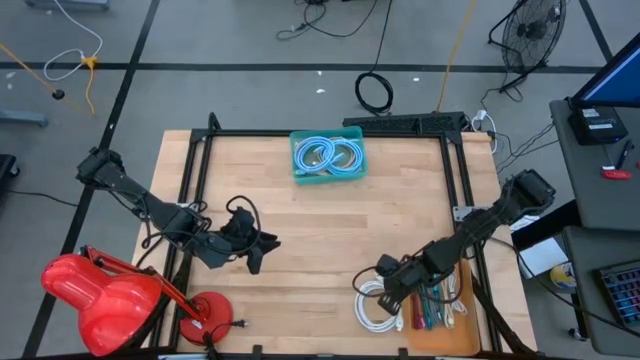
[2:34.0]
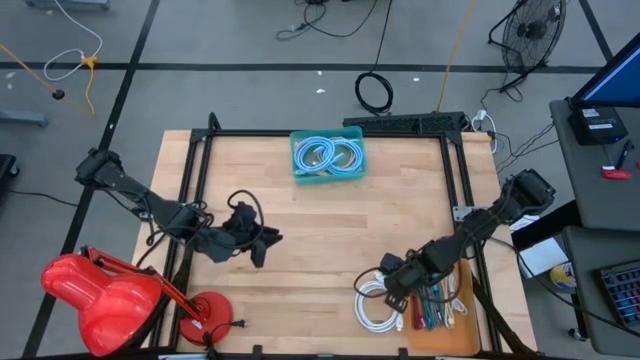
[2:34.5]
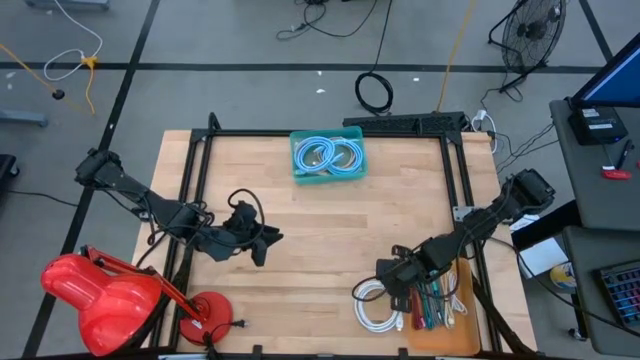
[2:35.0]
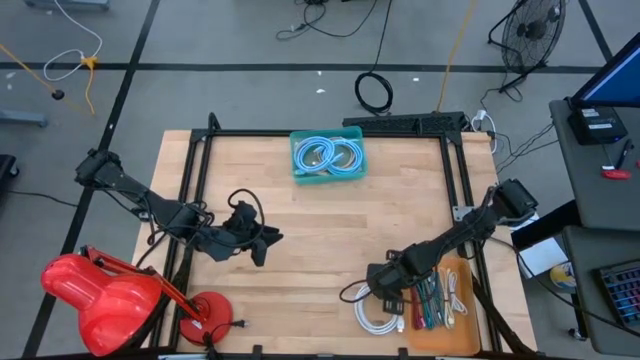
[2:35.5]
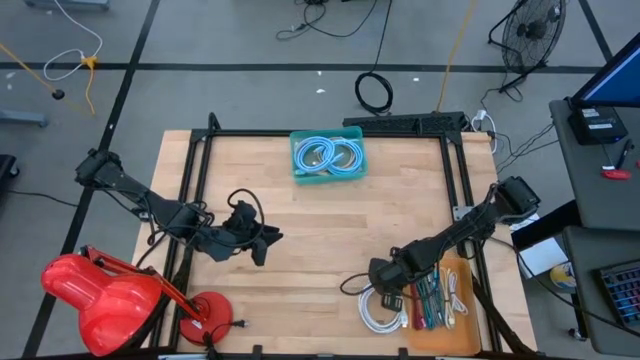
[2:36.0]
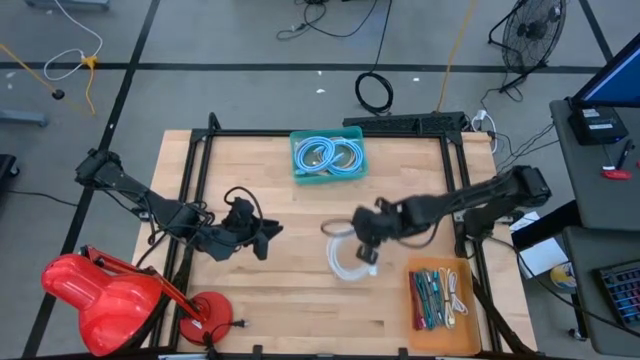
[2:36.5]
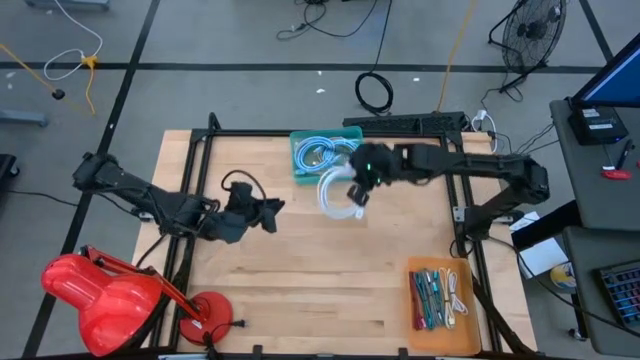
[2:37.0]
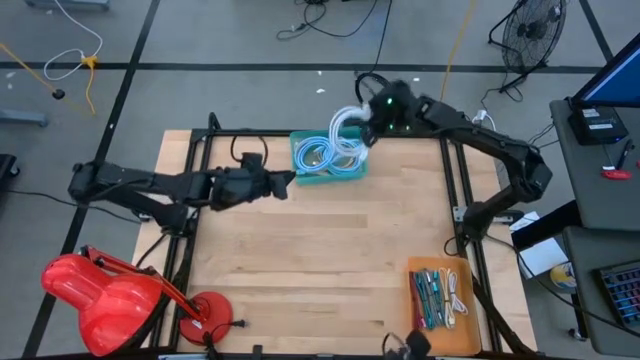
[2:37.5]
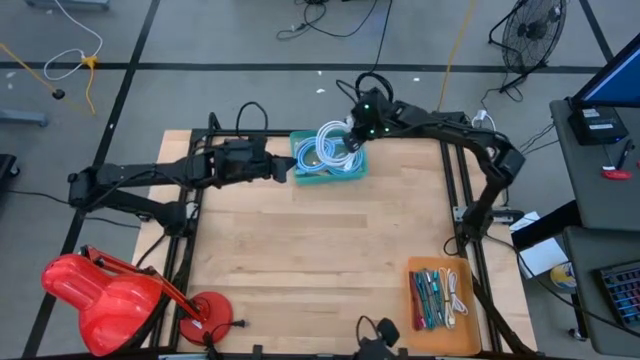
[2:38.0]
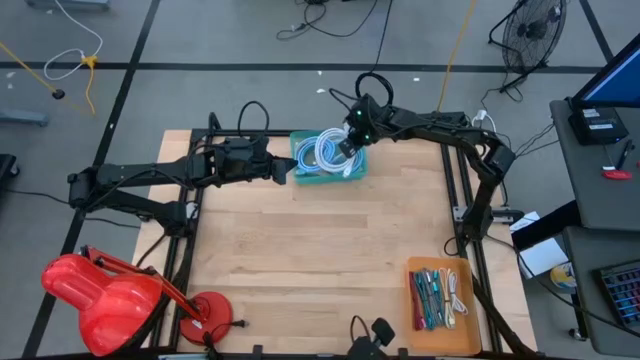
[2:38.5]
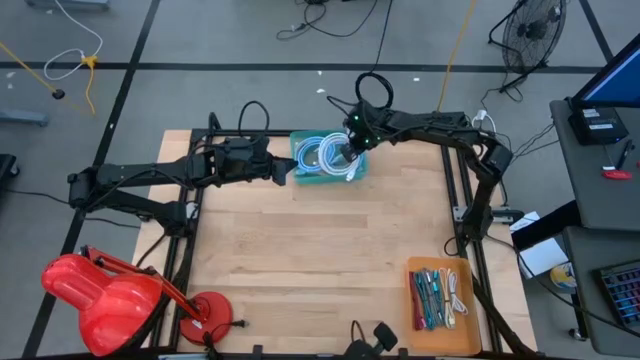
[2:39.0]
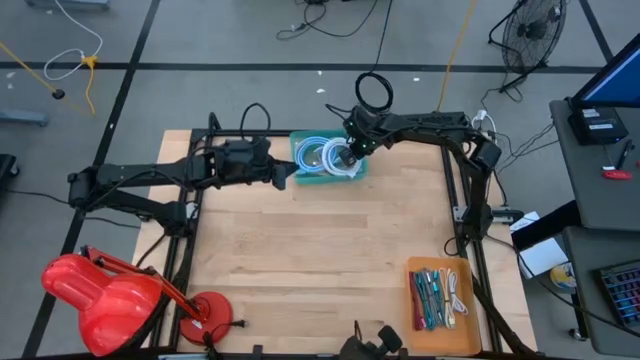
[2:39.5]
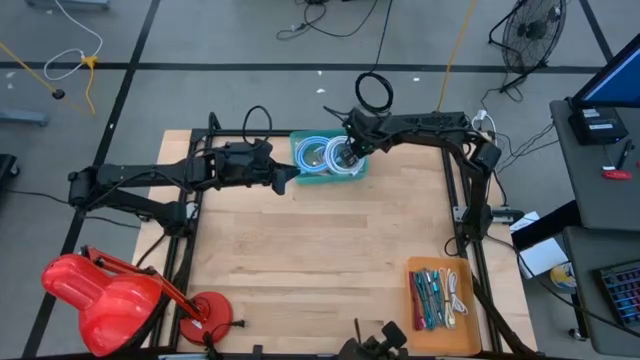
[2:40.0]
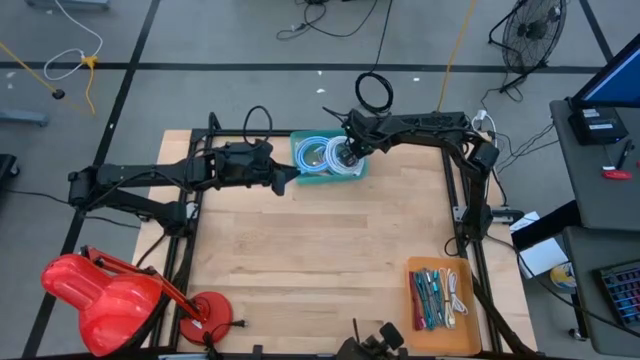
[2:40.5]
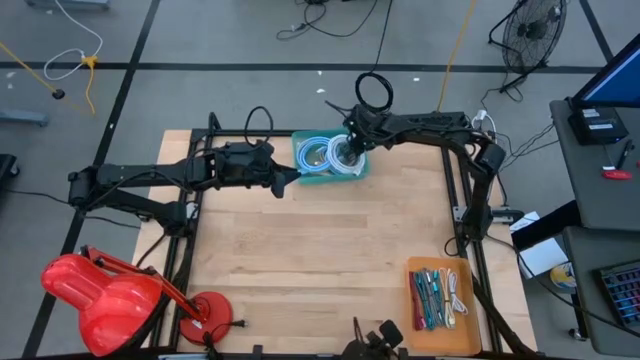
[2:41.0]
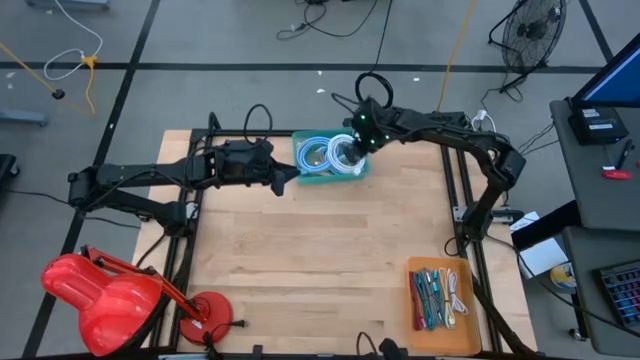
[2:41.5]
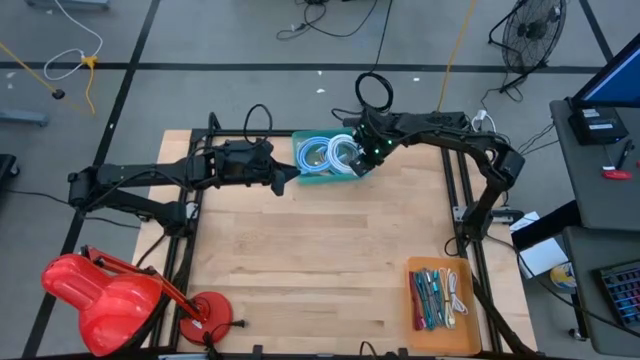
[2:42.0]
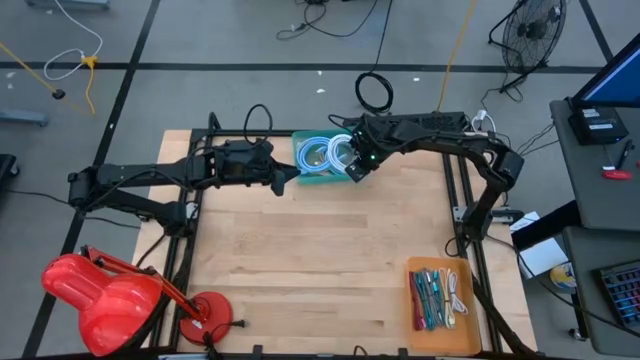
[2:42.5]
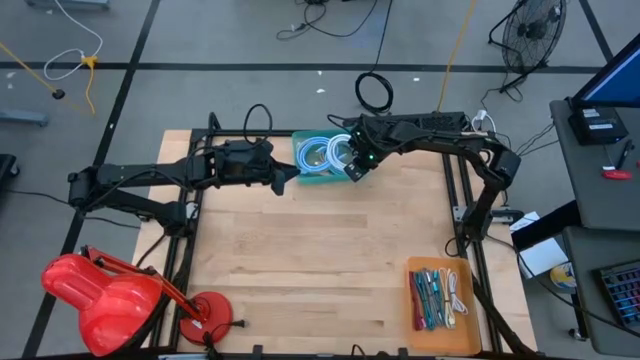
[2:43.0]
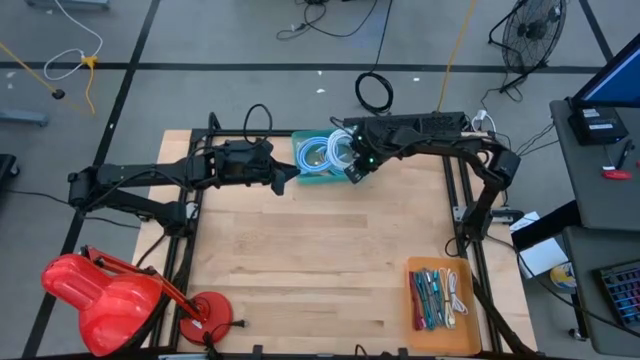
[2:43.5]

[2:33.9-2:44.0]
Task: Pick & Place USB Port
Put the white display cable into the blue bin

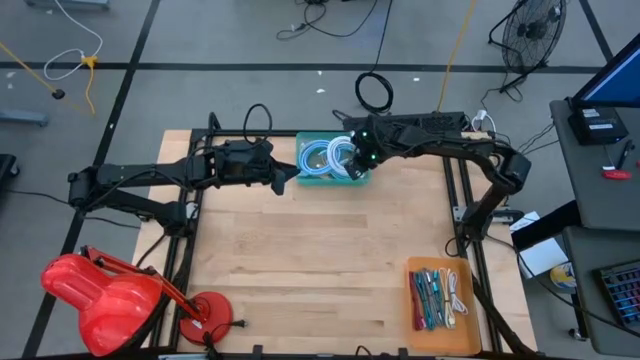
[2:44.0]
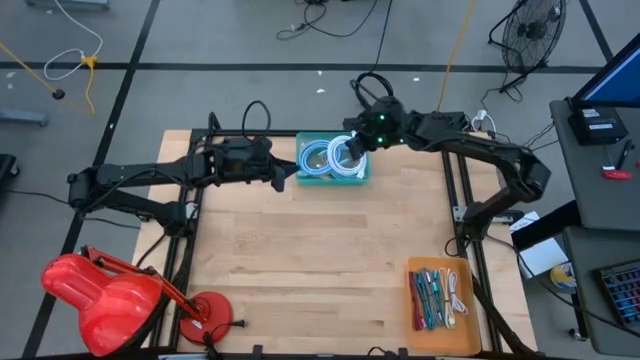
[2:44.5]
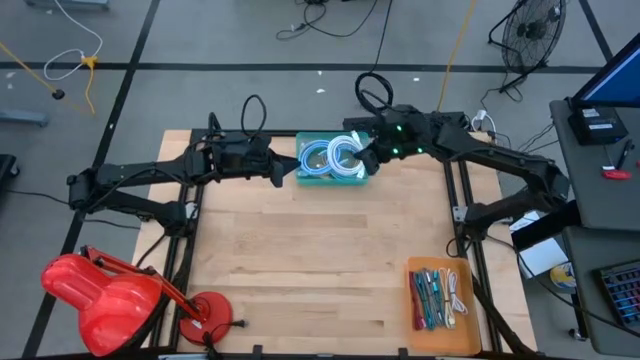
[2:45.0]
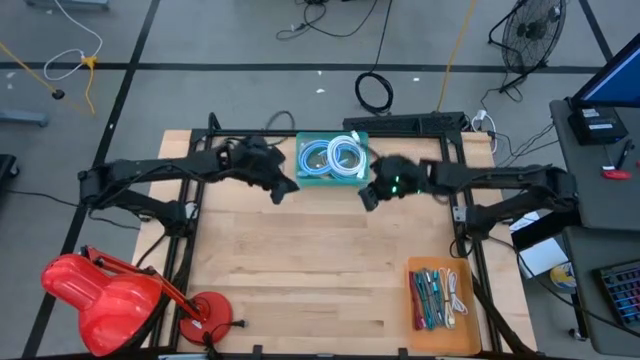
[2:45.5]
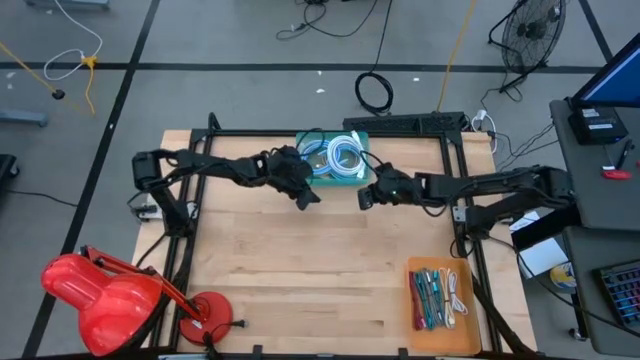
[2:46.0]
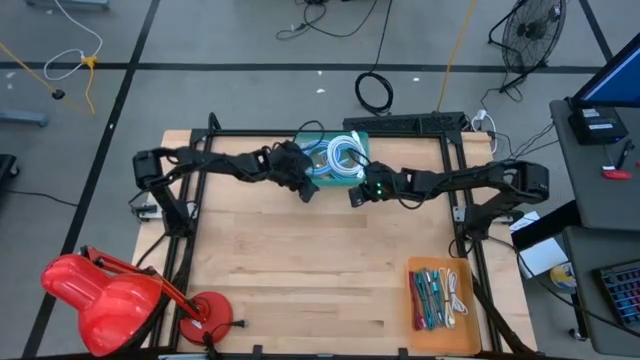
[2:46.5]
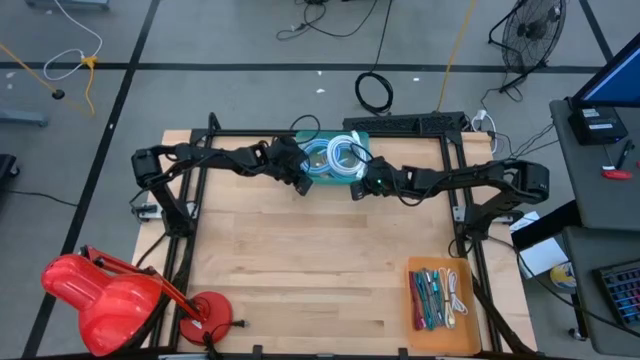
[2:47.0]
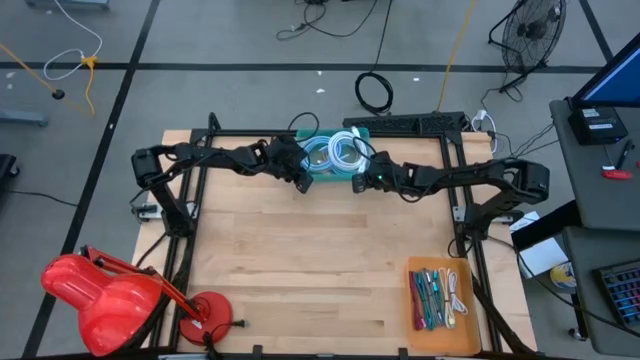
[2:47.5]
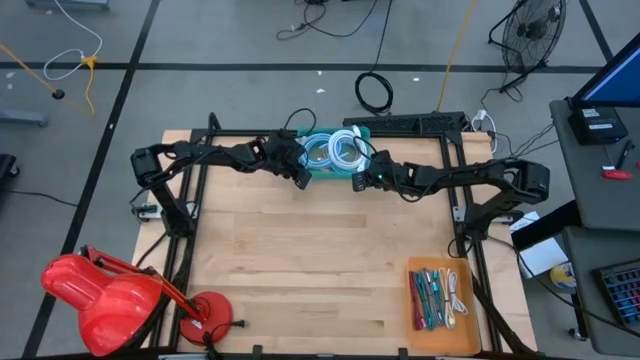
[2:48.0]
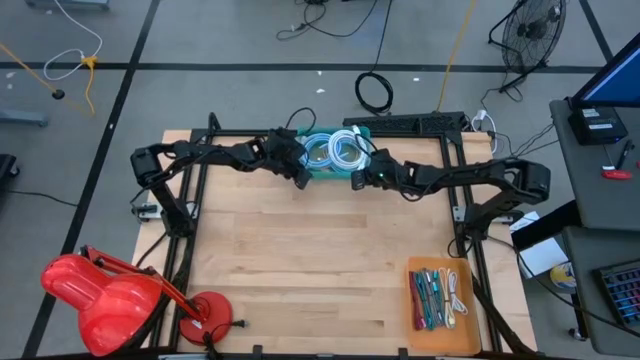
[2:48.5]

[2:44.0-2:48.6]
Adjust the blue bin on the table

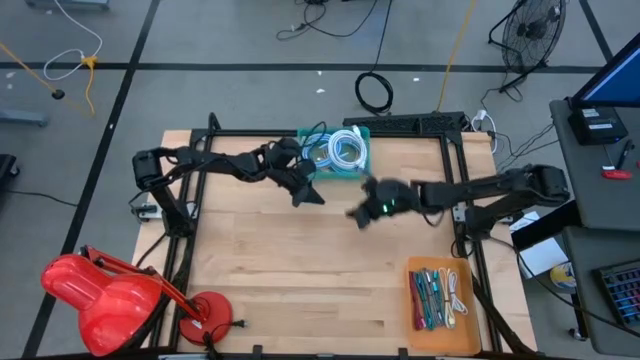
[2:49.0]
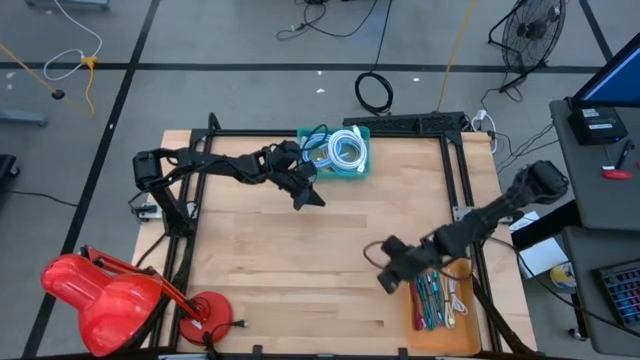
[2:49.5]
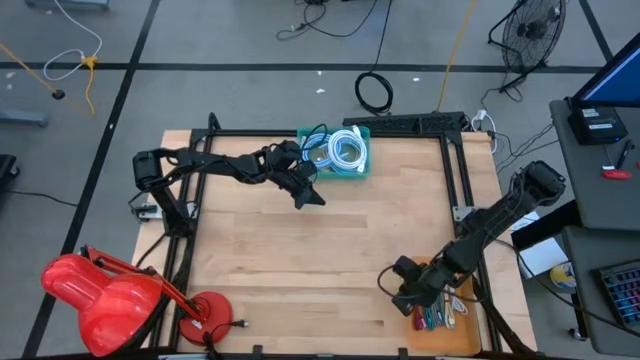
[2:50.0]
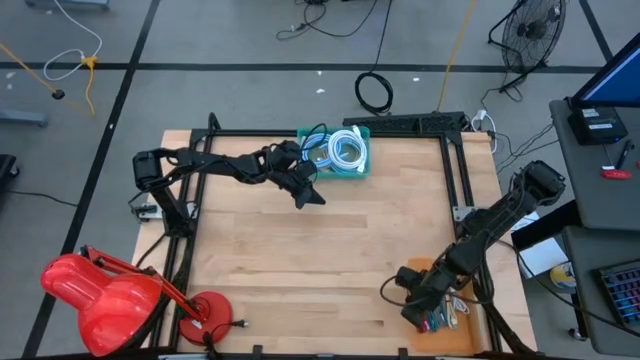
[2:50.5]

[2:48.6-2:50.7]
Adjust the orange bin on the table

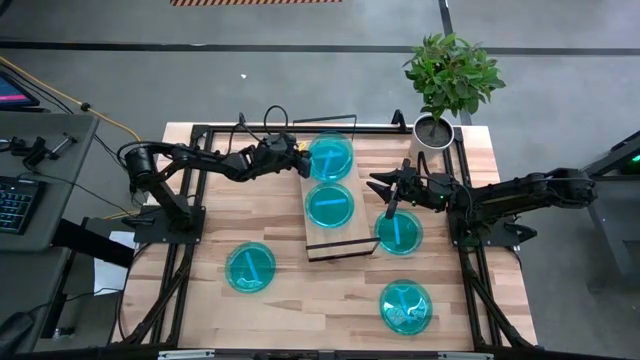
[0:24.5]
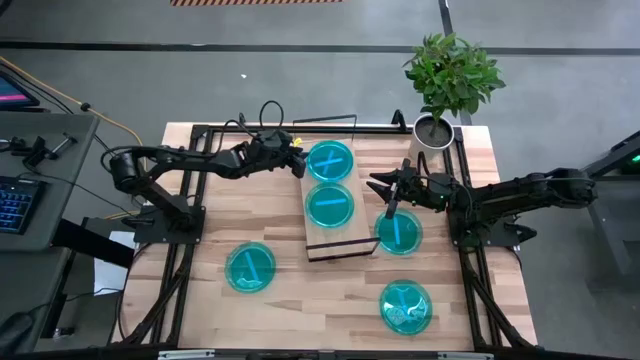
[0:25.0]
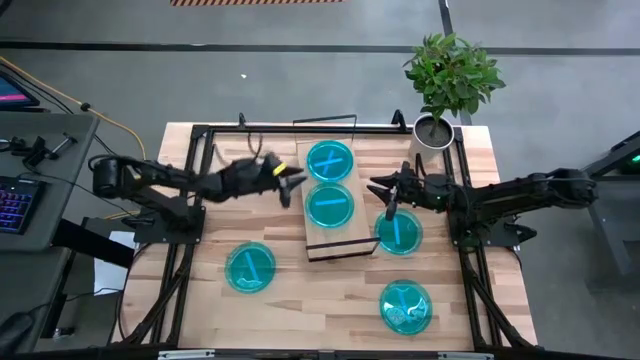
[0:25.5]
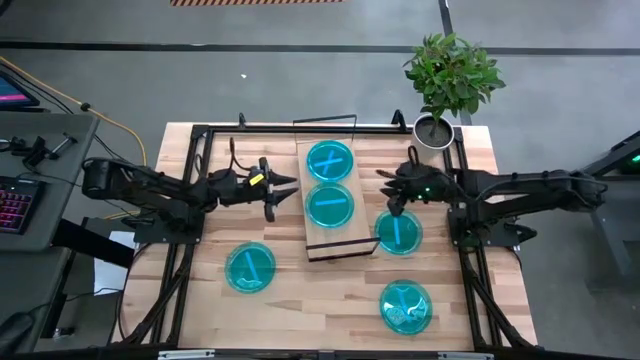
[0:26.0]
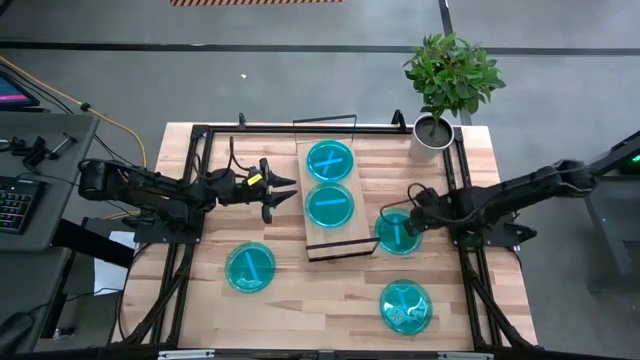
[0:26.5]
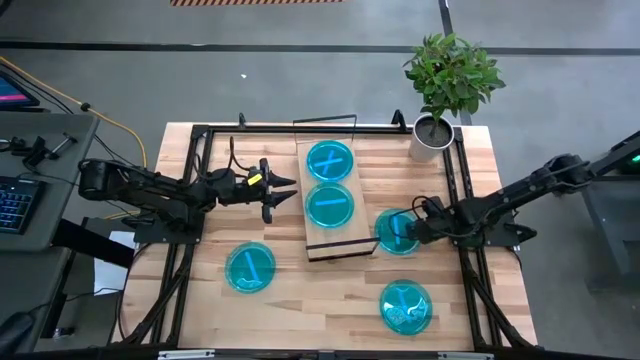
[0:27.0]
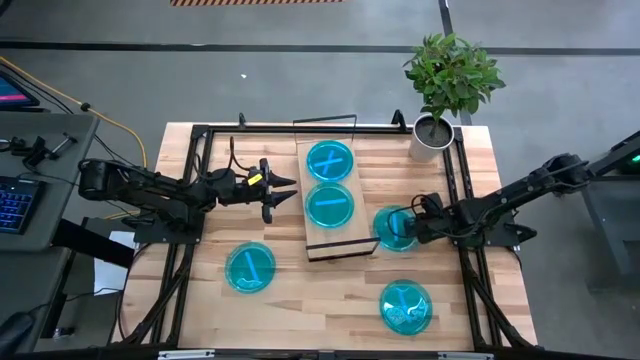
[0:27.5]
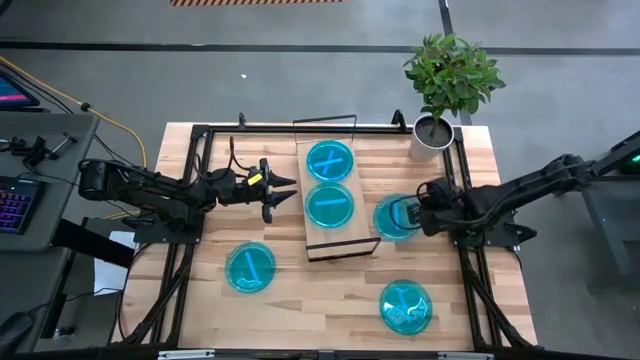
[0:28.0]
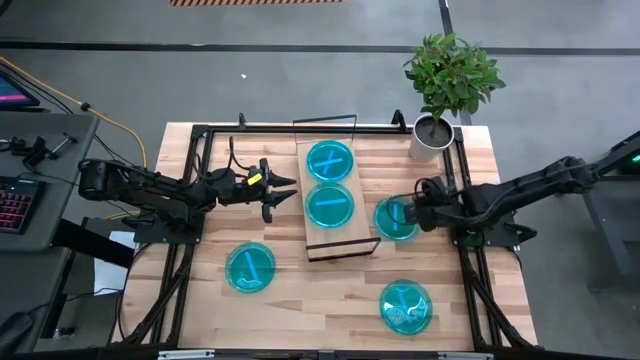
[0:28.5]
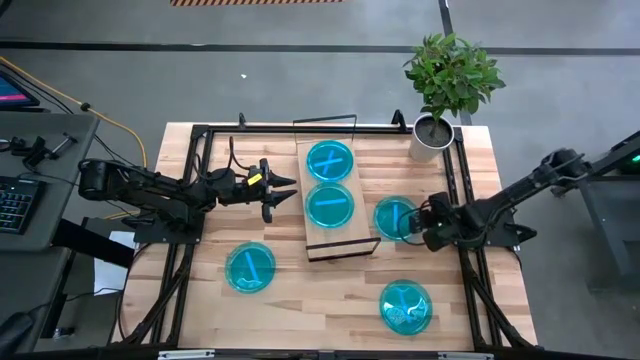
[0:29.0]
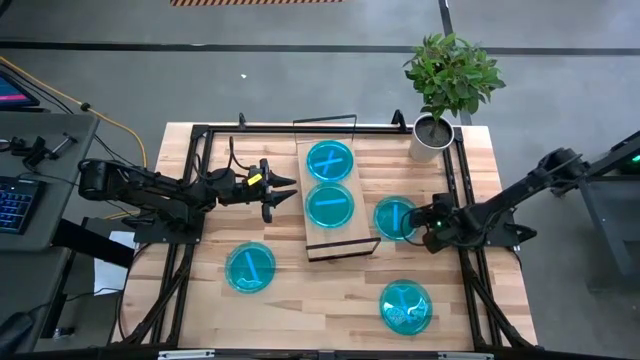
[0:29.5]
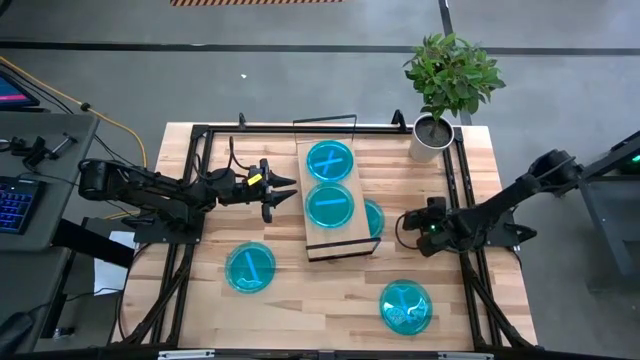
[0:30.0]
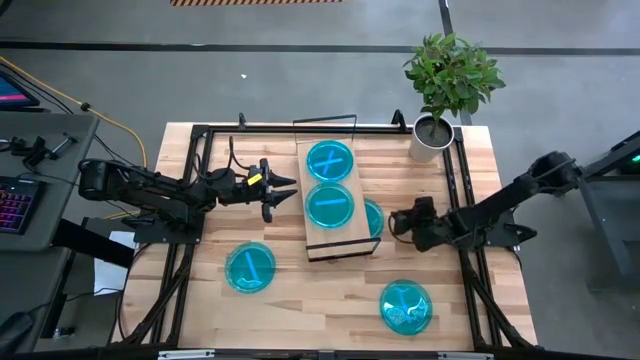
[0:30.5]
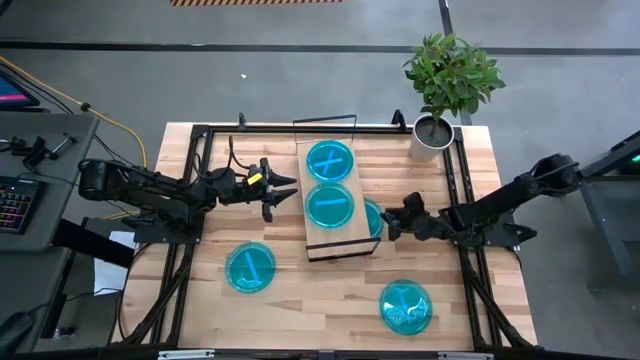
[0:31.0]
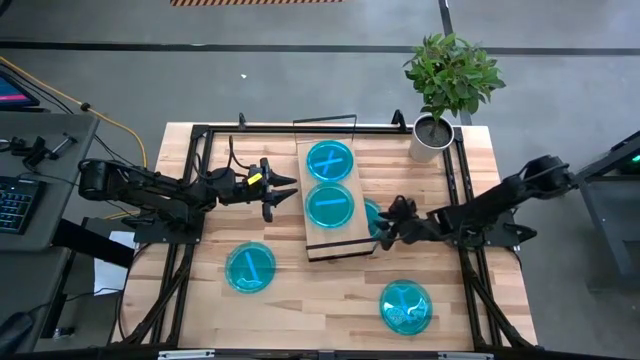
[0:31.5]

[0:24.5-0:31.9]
Task: Place and stack plates onto a shelf
Stack the blue plate on top of the blue plate on the shelf
